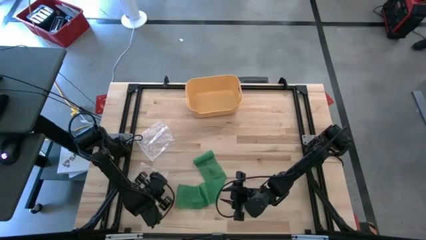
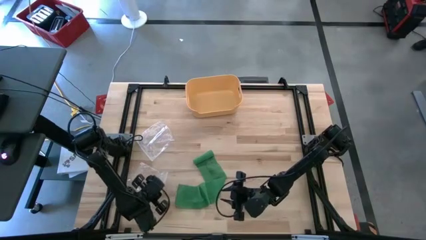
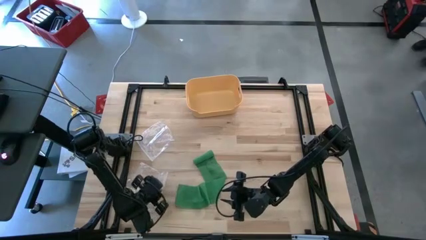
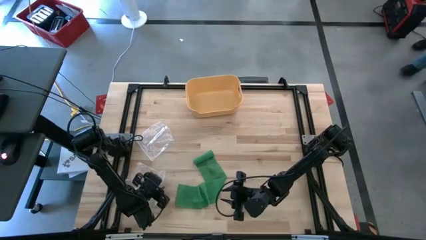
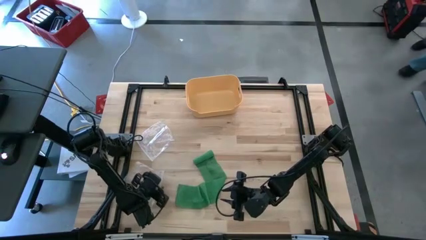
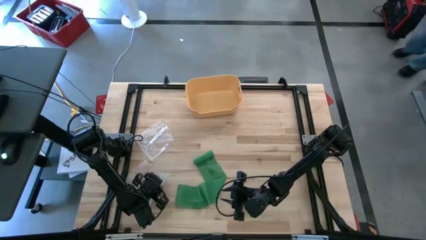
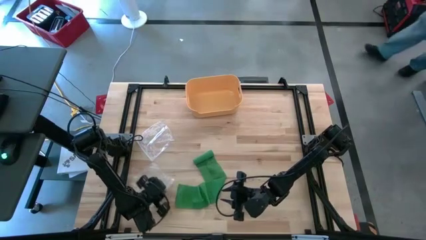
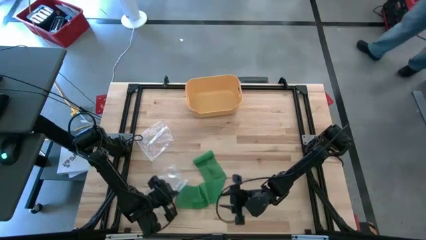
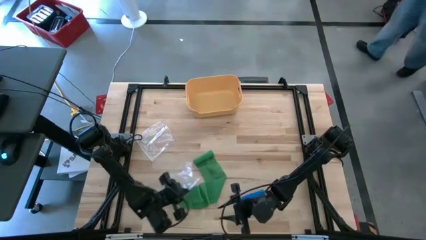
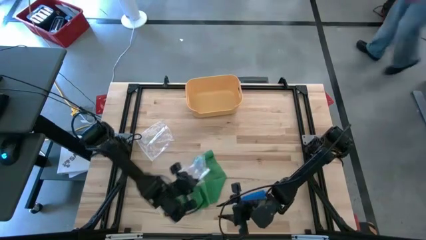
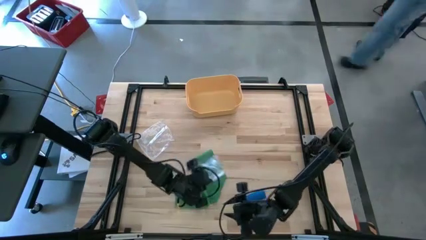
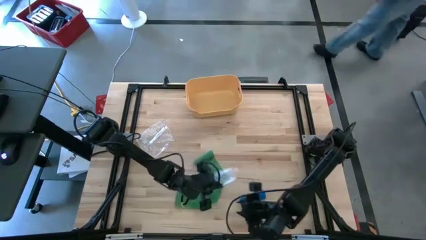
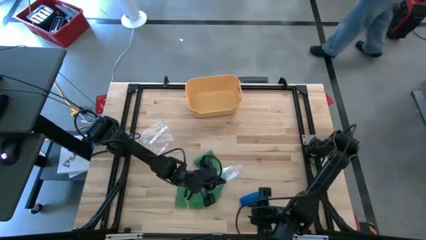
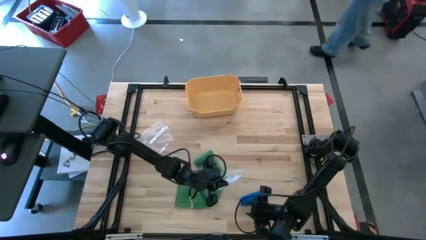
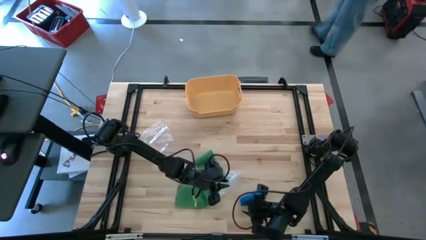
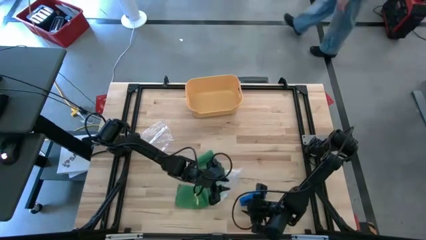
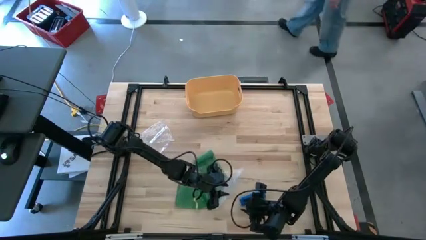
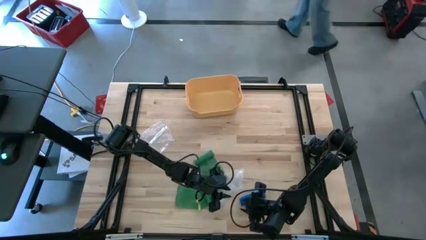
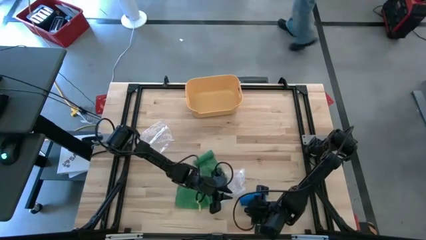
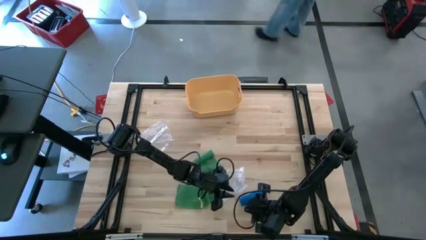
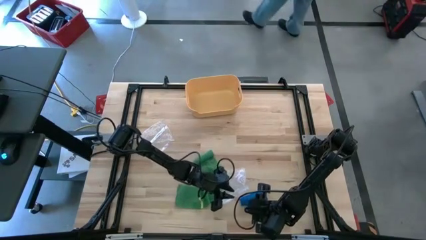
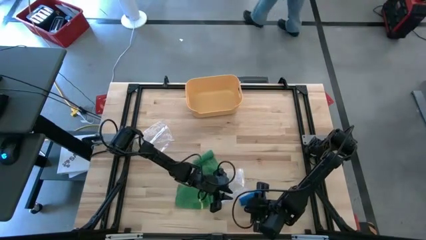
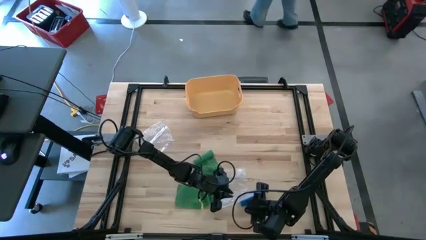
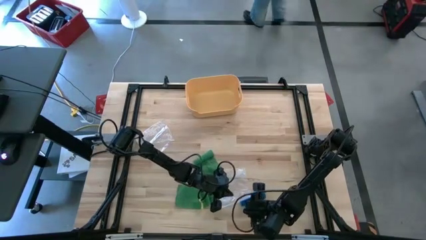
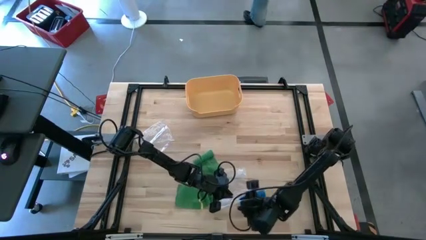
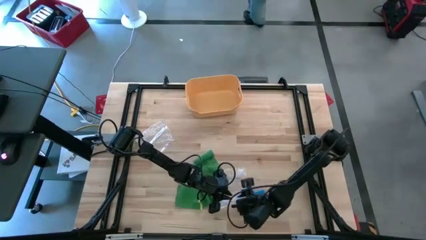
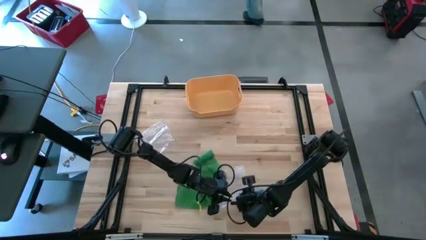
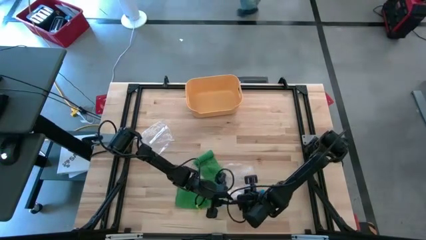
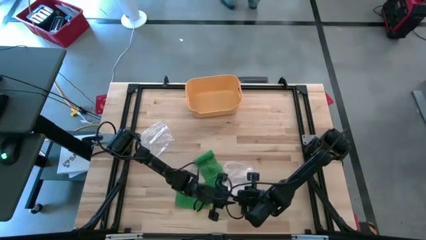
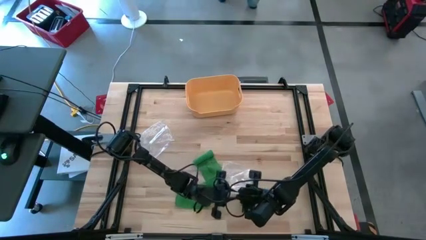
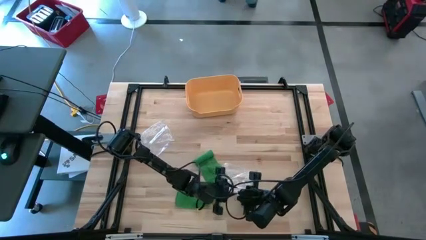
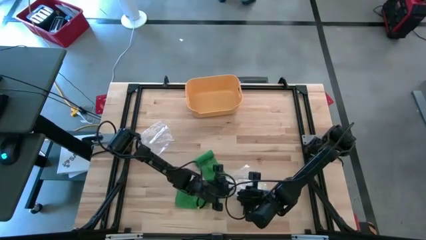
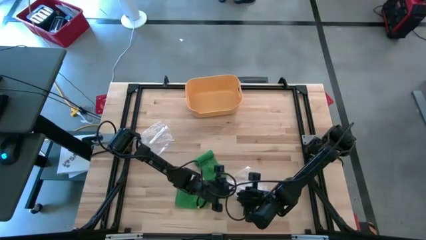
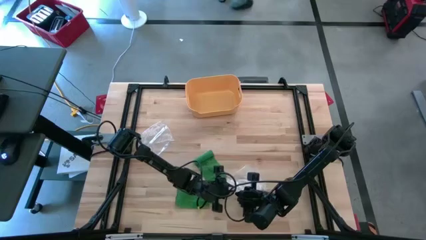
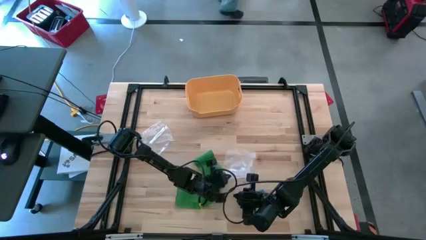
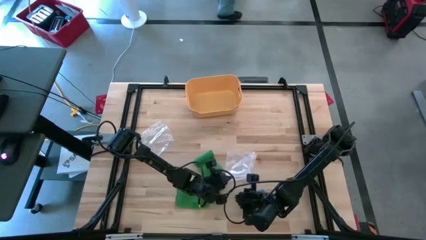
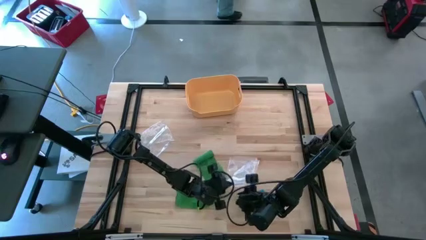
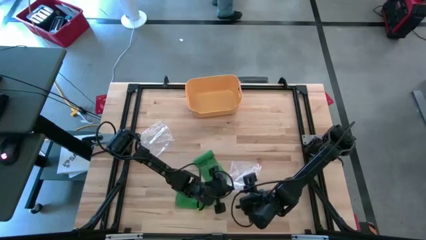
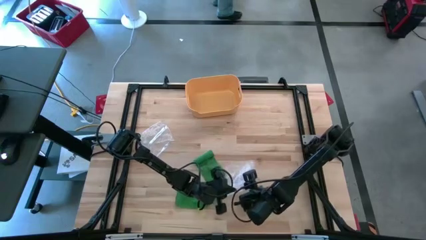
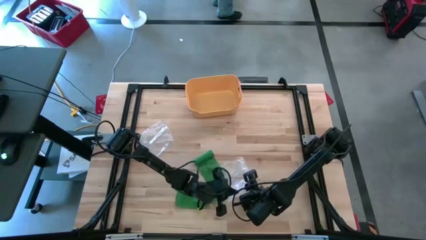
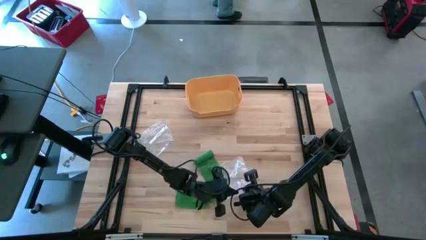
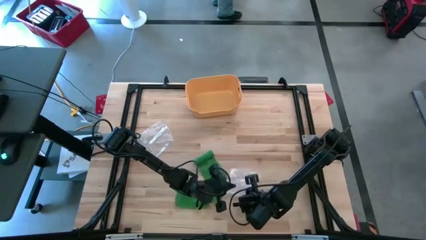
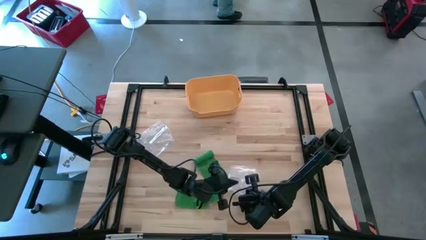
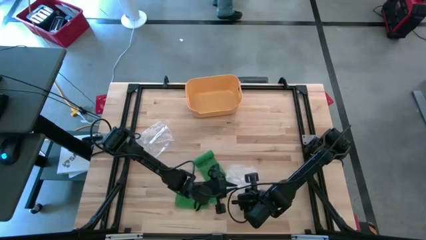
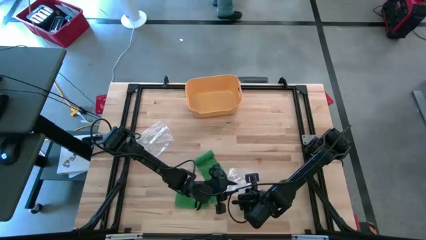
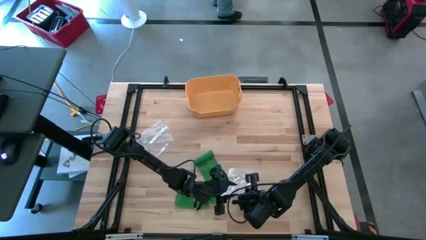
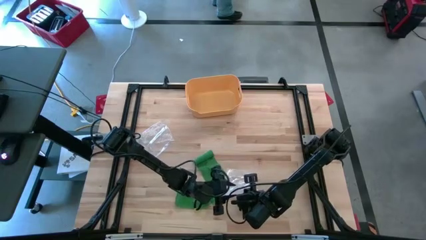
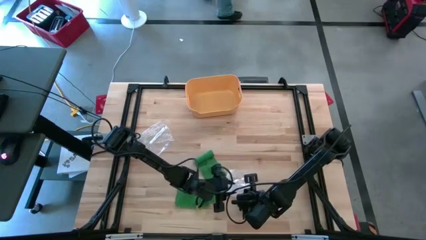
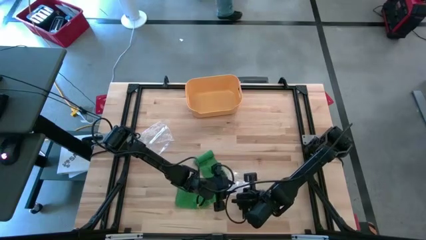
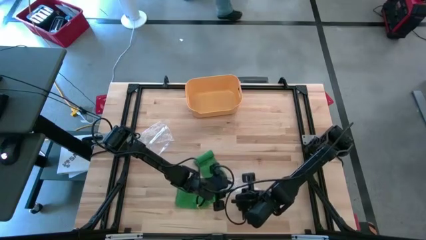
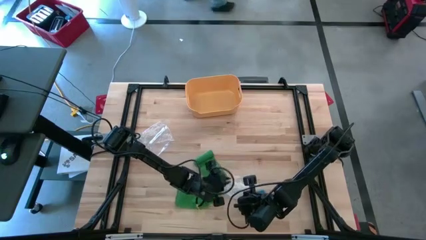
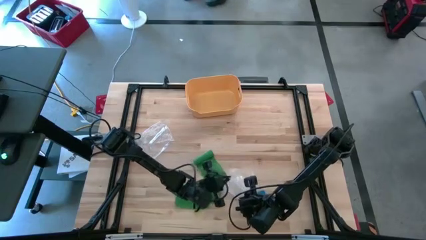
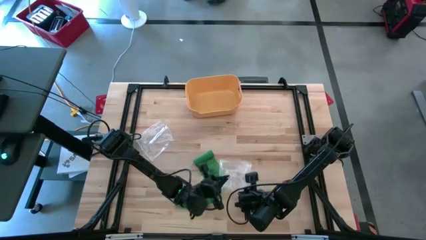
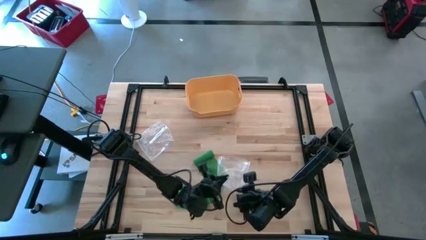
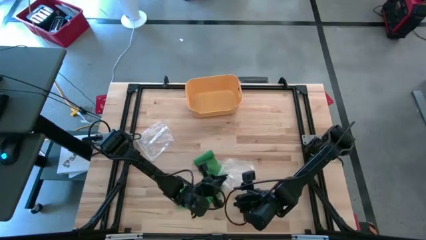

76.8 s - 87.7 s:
Task: Roll bandage
Open the bottom transparent zip bag

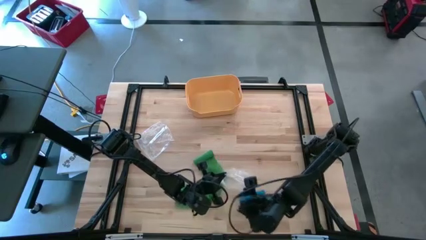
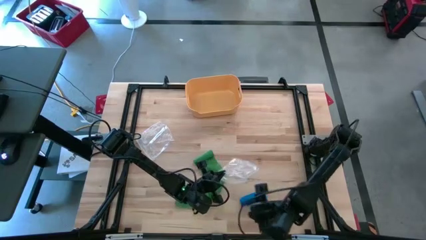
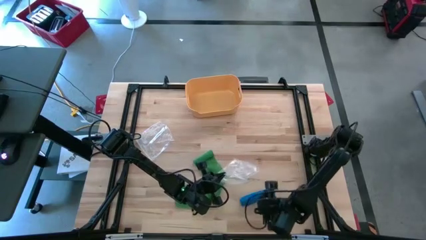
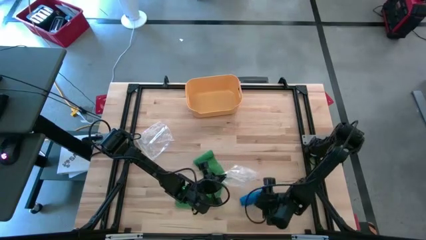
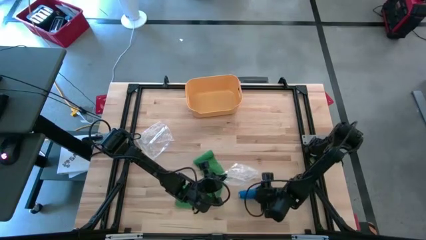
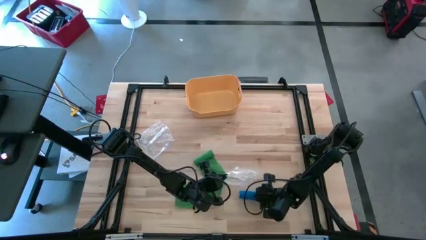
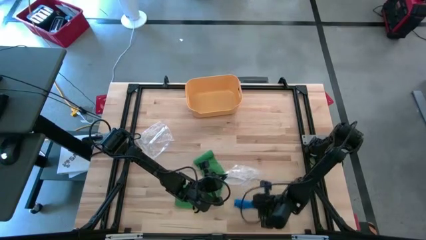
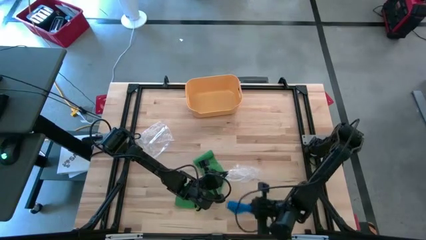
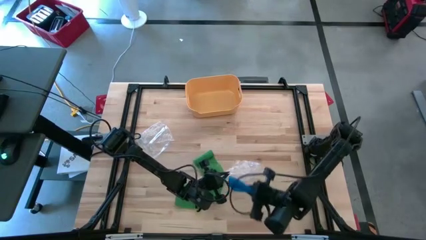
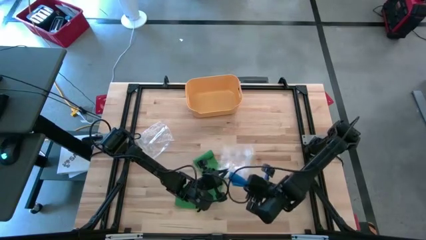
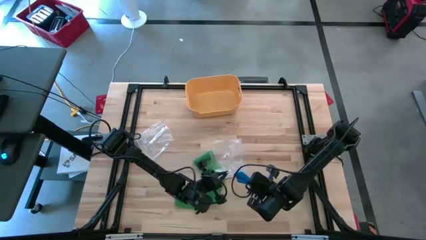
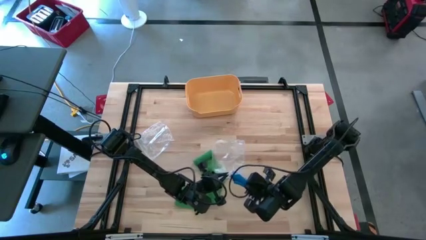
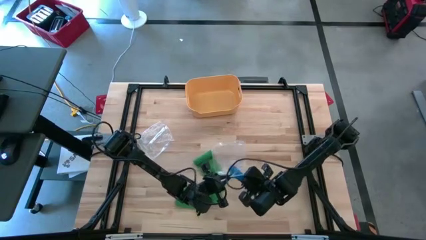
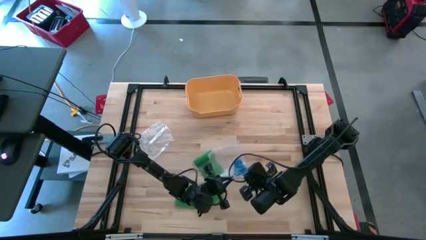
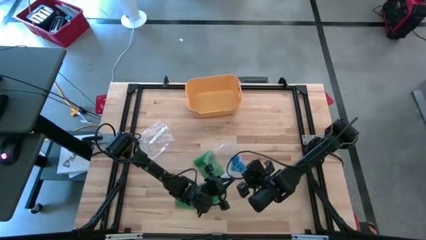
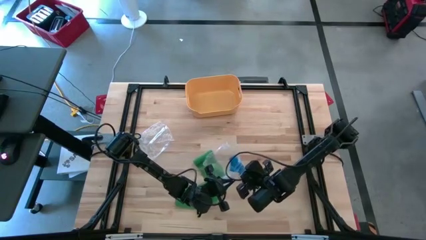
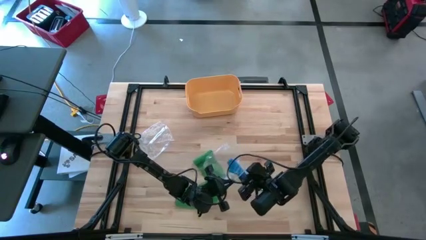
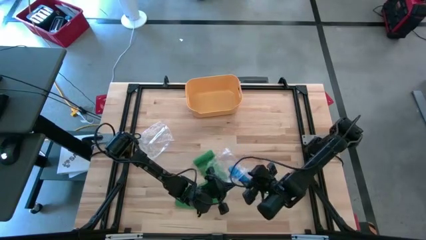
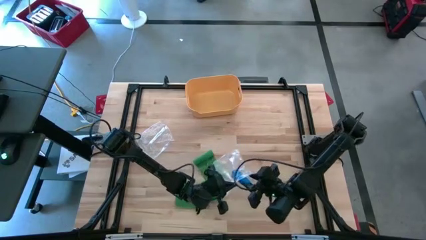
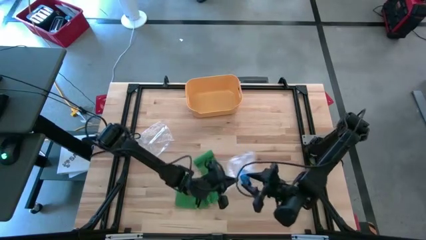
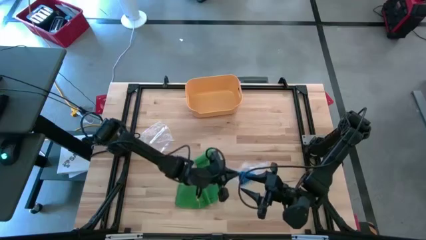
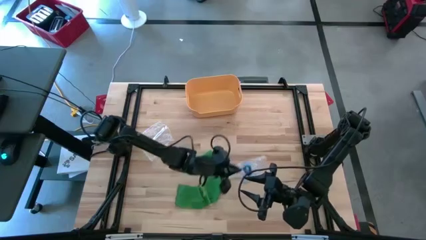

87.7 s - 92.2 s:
Put the rolled blue bandage into the bottom transparent zip bag

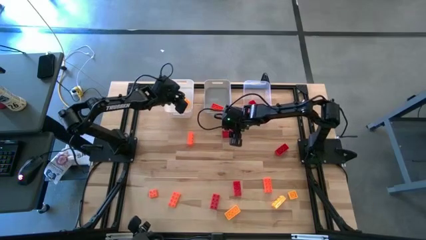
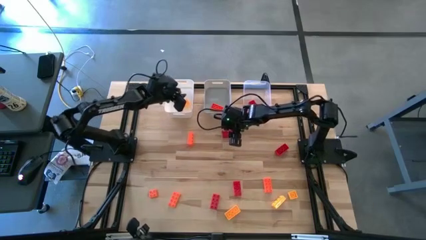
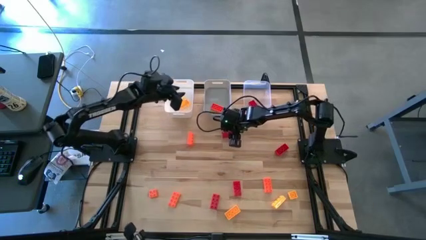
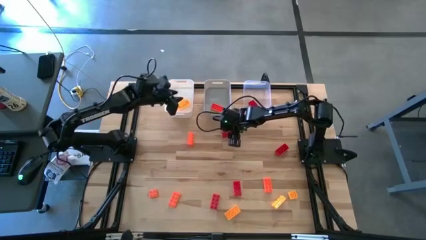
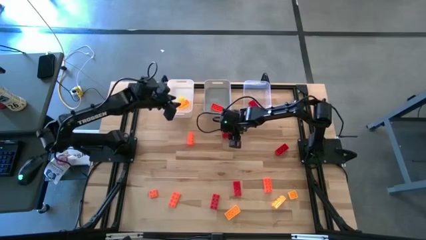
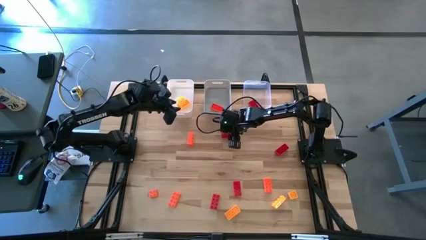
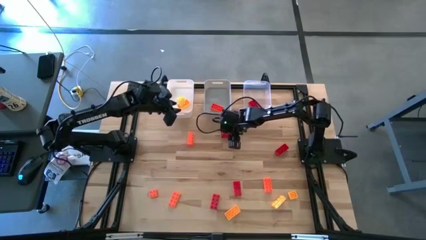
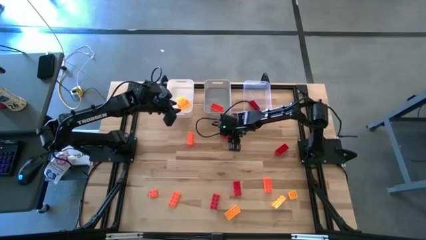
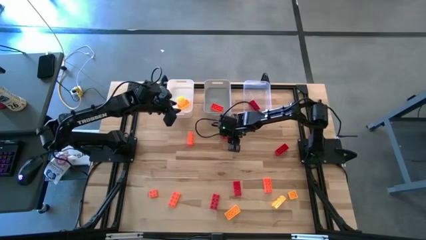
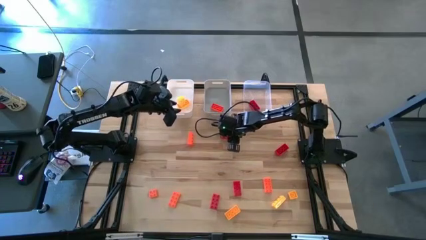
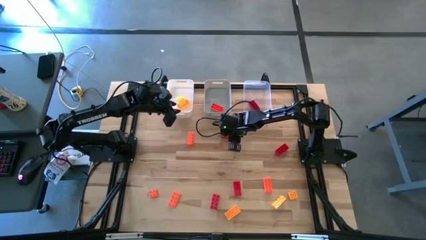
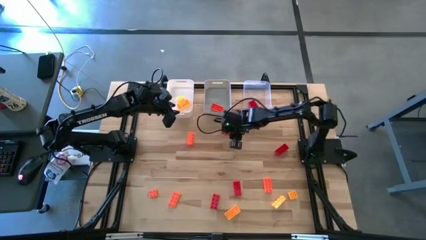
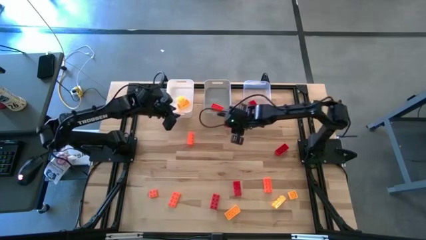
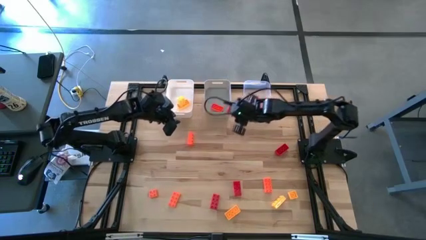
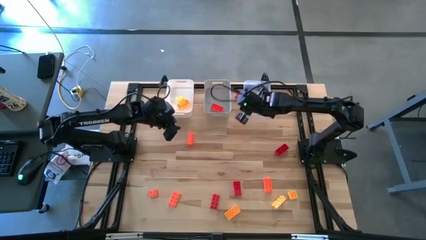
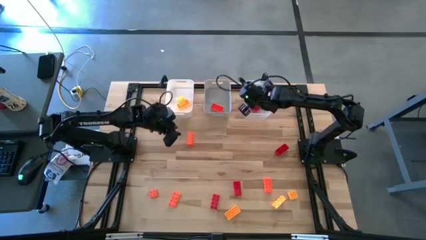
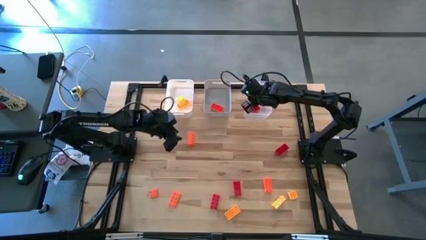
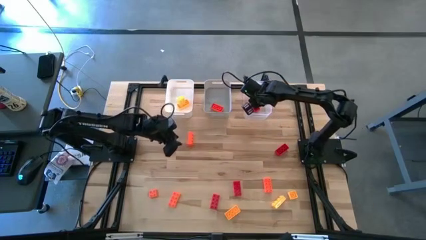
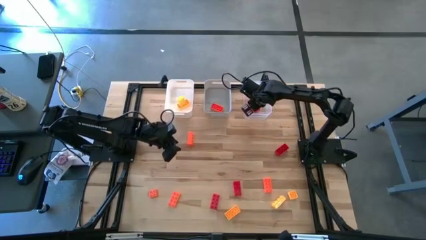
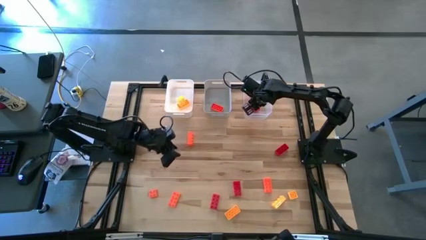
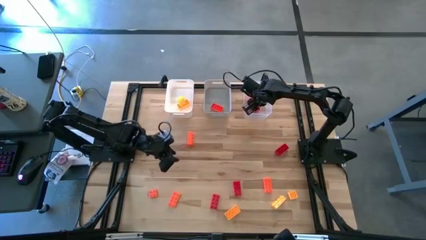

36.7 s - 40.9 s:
Task: Sort & place blocks by color
Put the red game piece into the transparent bin
